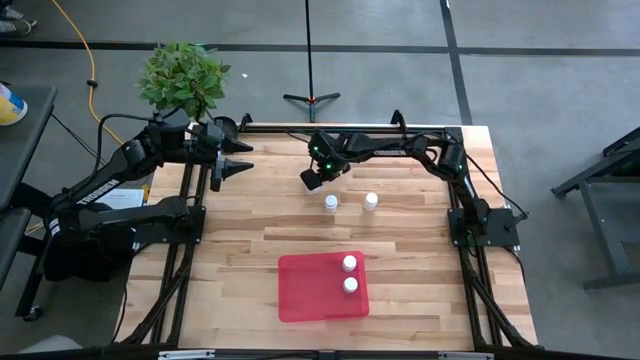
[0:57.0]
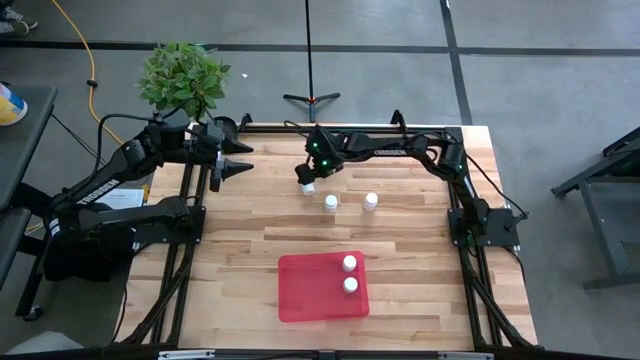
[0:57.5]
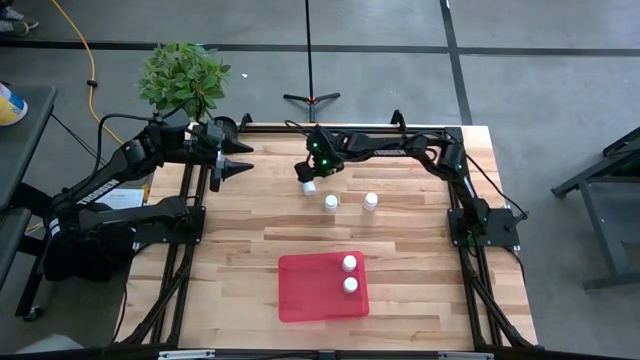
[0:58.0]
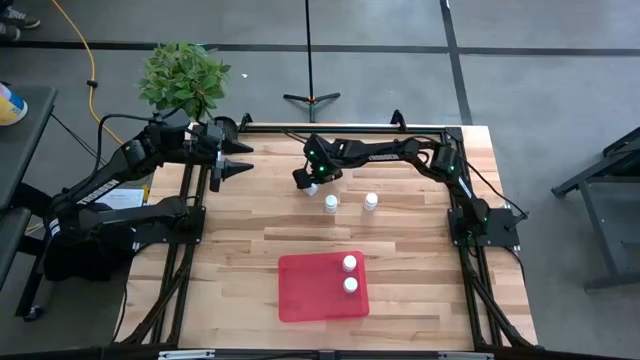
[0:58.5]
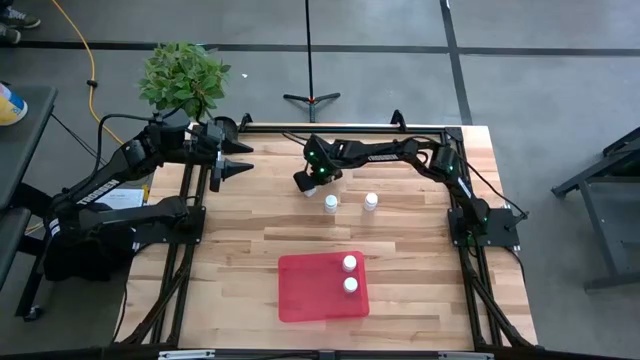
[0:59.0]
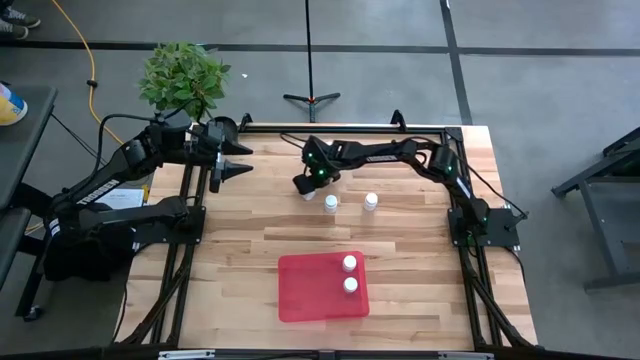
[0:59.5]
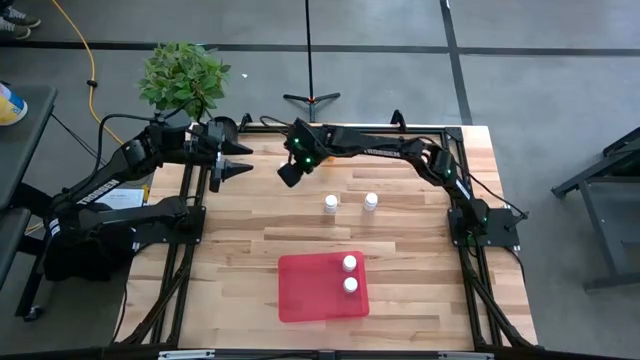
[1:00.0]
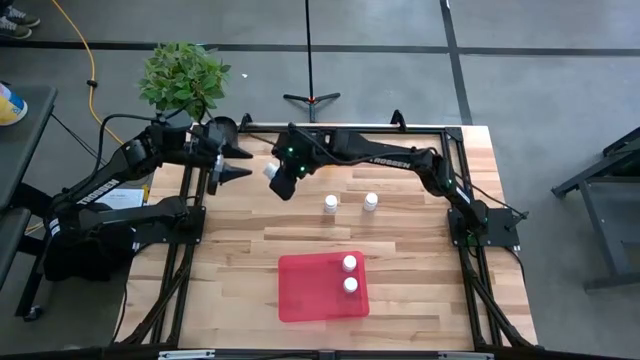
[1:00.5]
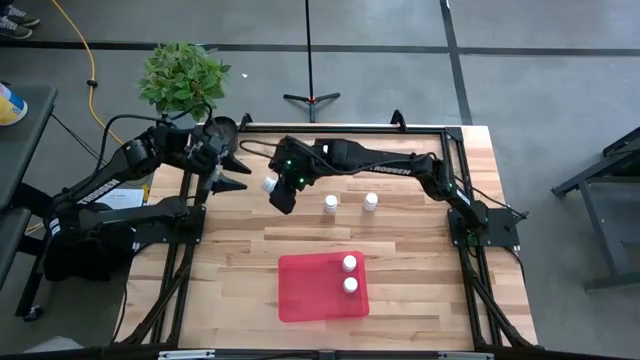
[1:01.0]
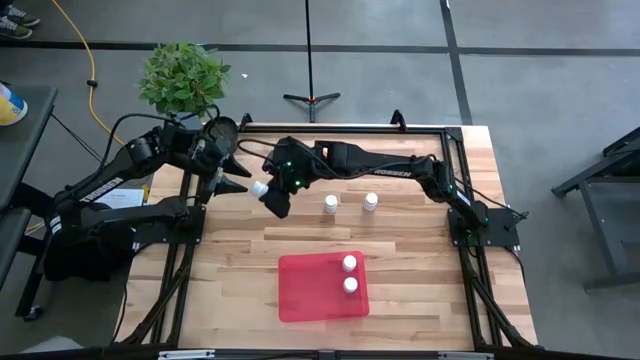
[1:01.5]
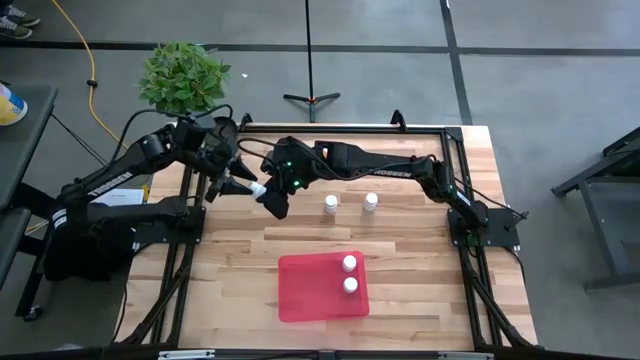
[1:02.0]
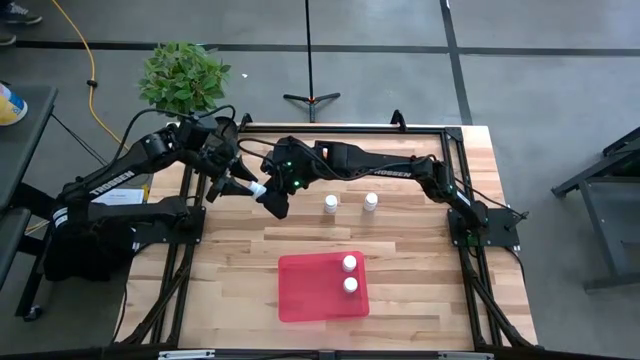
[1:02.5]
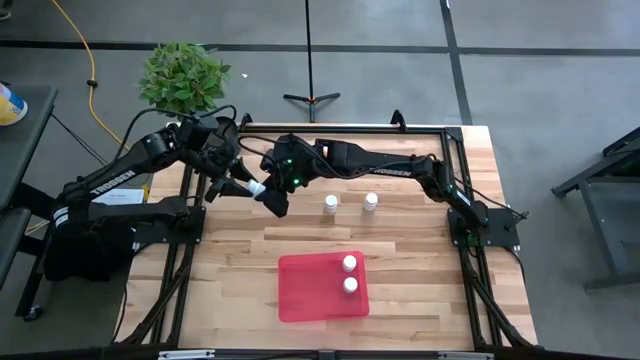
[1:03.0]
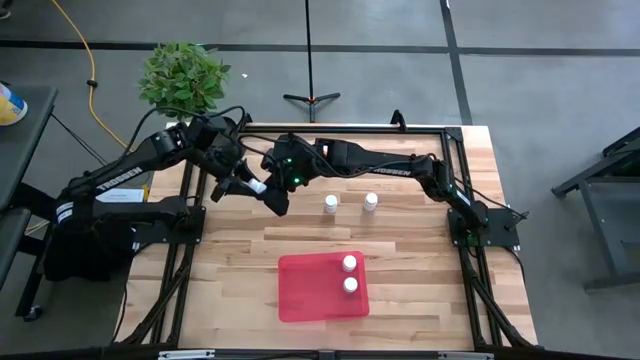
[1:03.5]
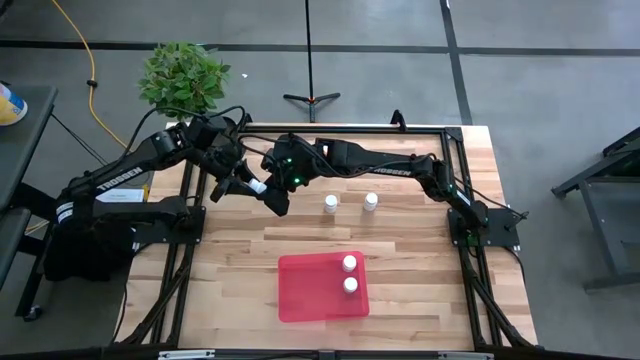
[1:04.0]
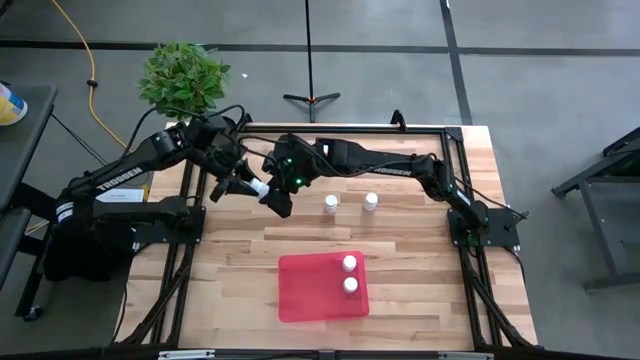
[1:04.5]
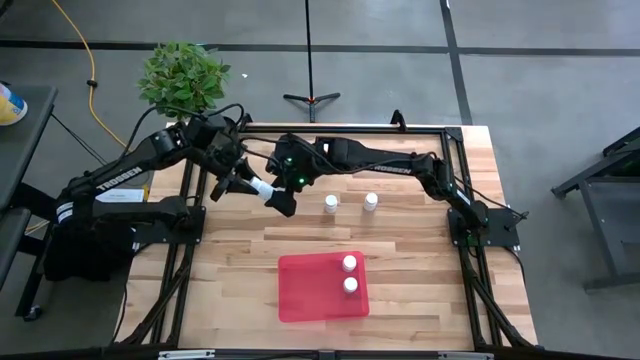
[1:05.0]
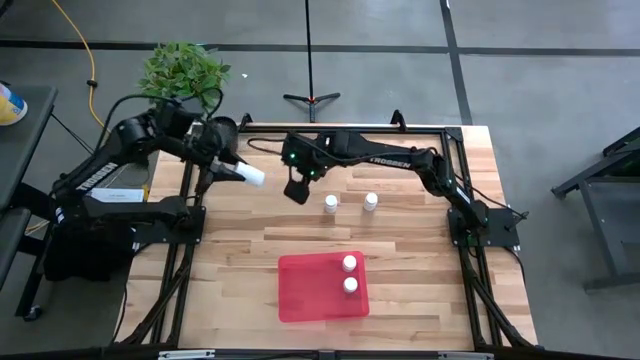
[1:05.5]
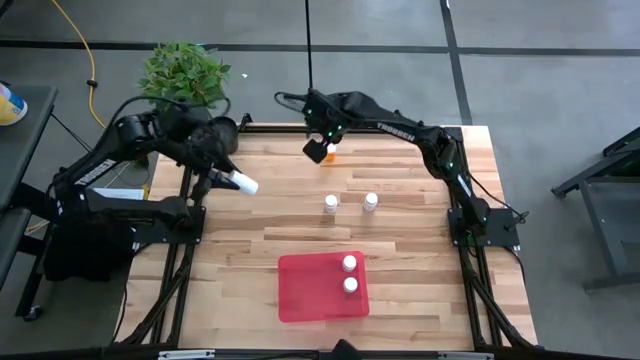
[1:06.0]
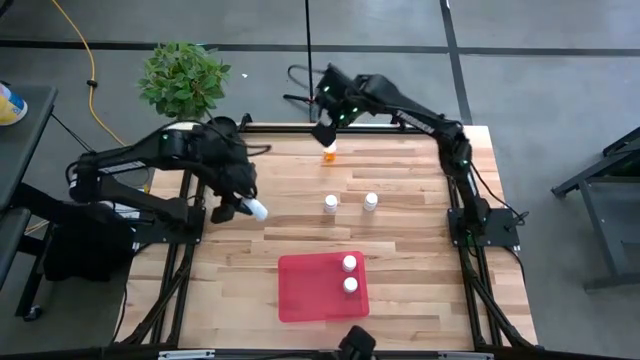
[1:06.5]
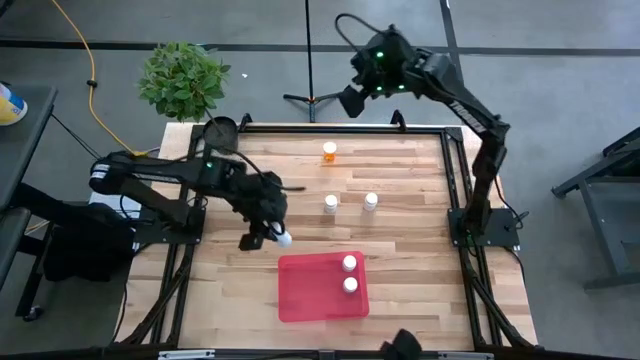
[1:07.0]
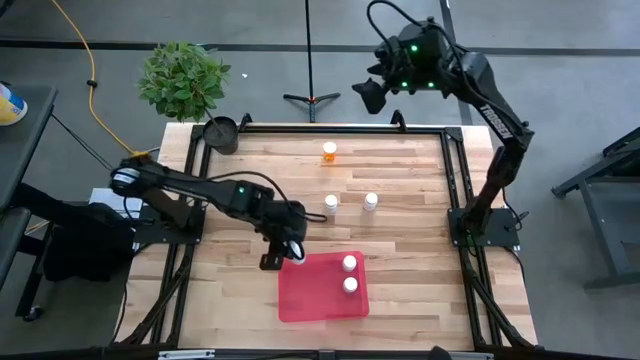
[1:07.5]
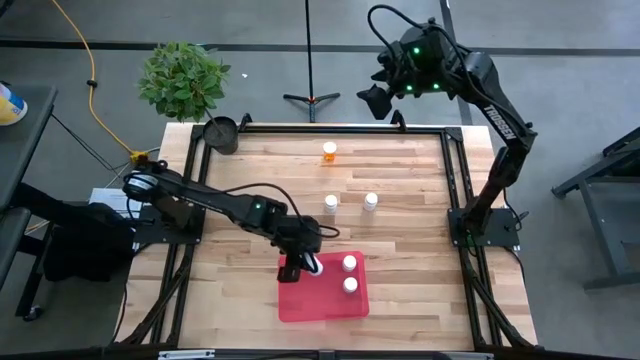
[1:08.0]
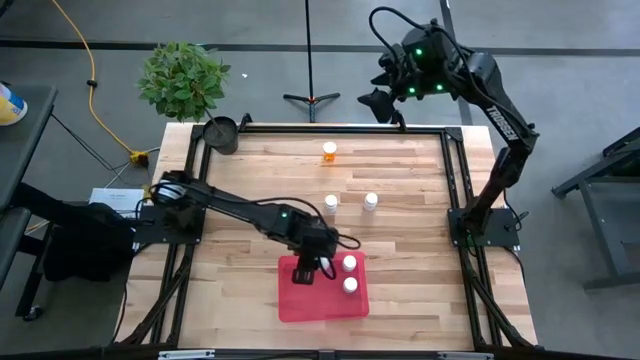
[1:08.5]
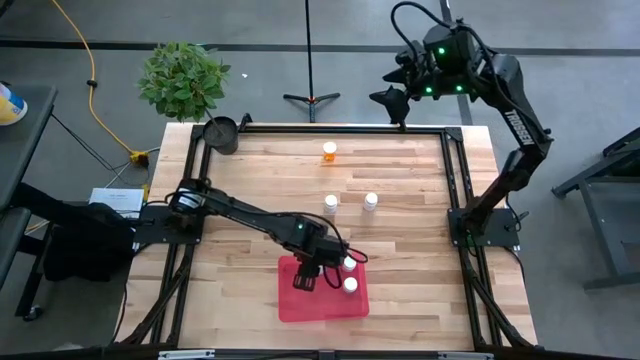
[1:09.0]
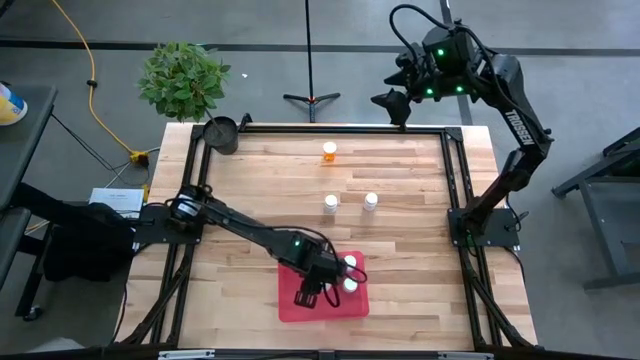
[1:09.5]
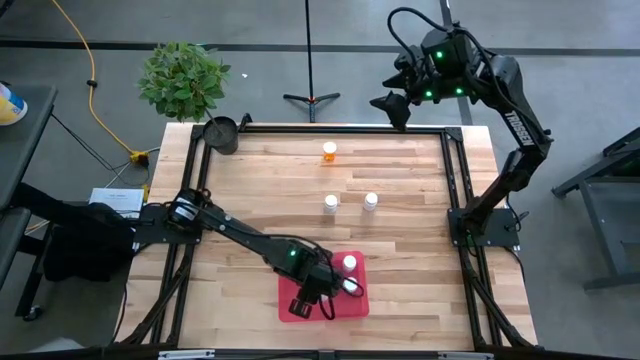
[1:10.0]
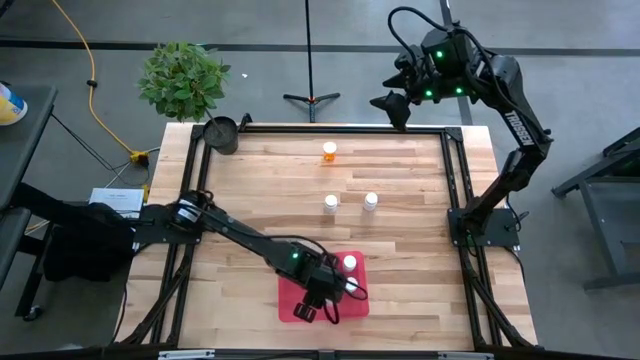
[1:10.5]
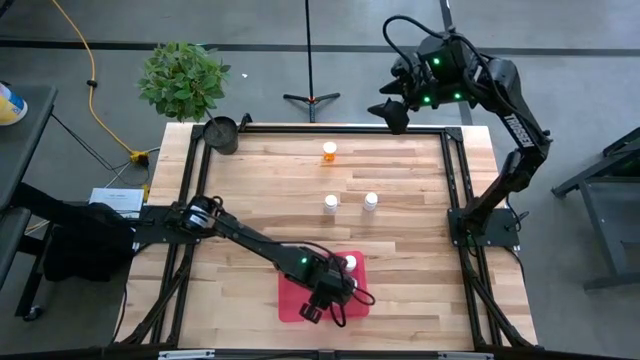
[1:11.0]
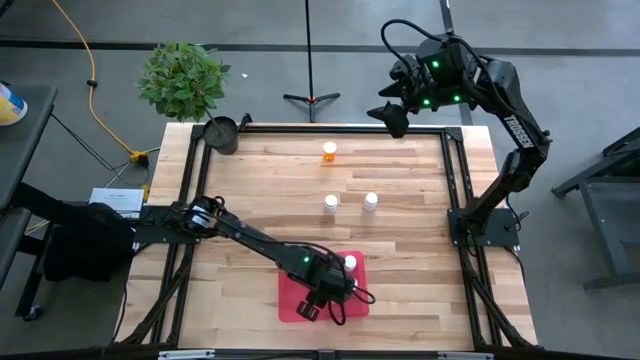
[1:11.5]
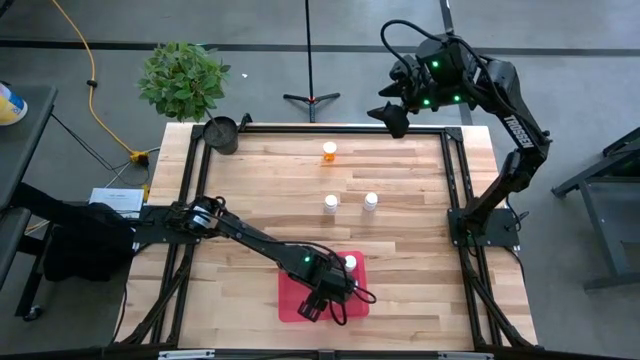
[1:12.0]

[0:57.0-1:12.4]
Task: Pick and place pill bottles into a basket
Put the white medicine bottle into the red container

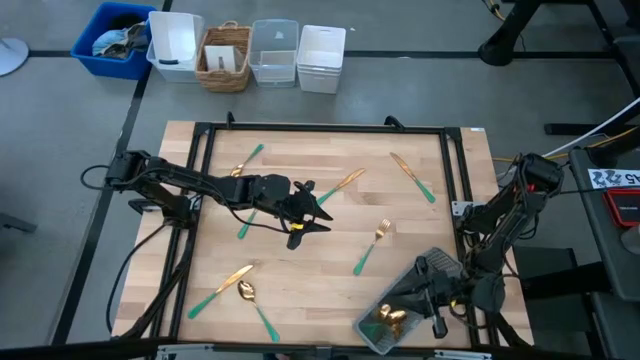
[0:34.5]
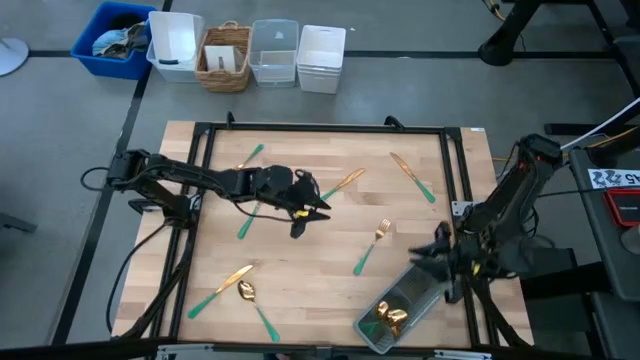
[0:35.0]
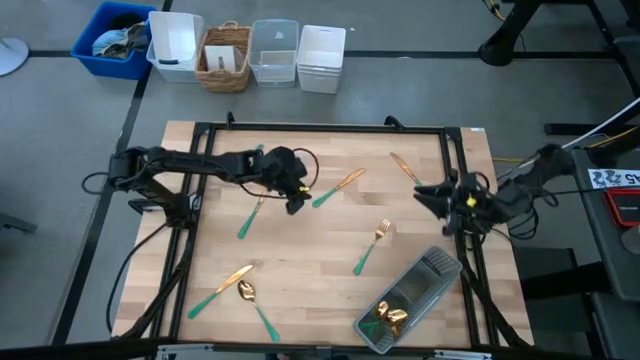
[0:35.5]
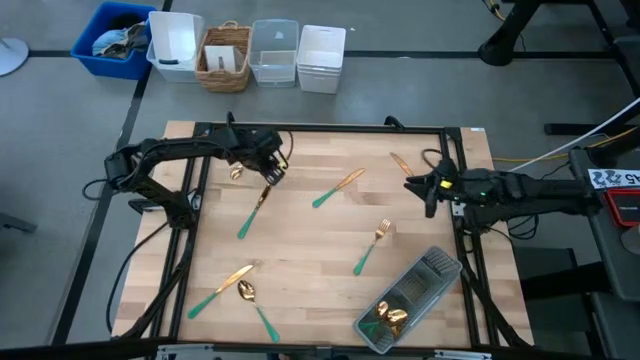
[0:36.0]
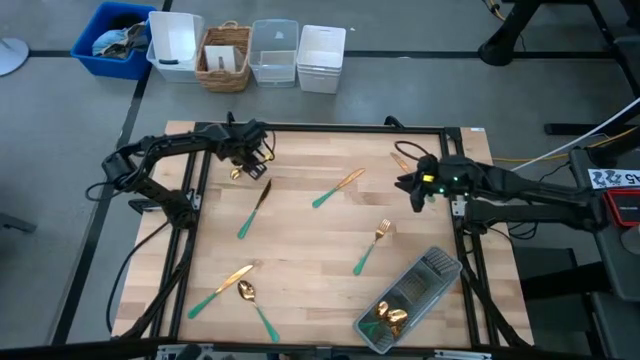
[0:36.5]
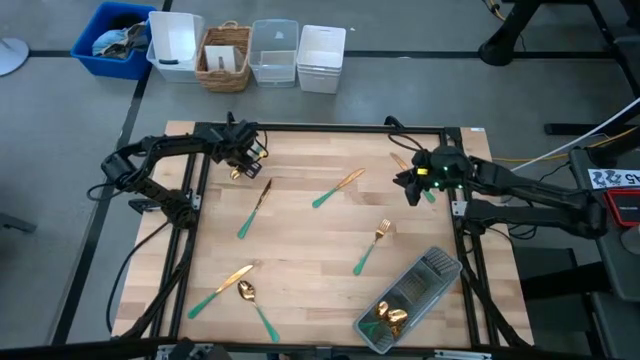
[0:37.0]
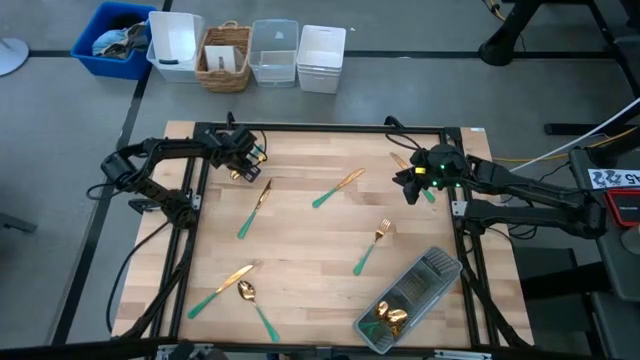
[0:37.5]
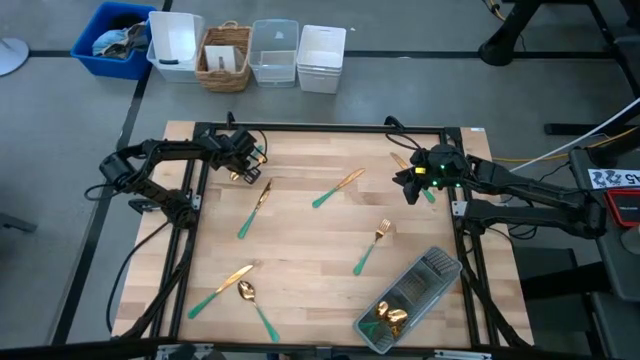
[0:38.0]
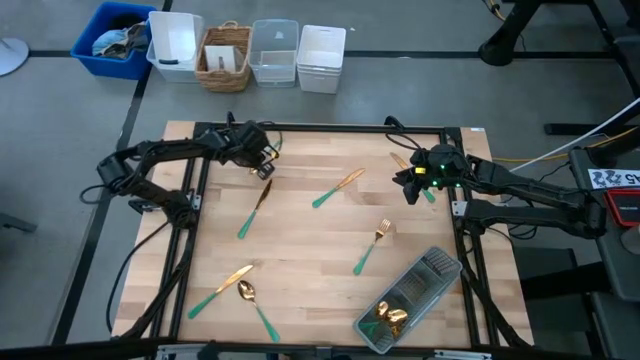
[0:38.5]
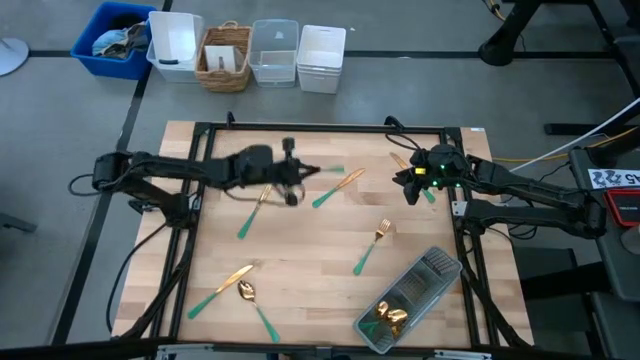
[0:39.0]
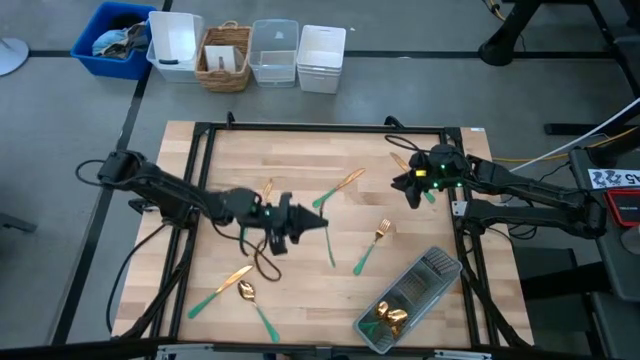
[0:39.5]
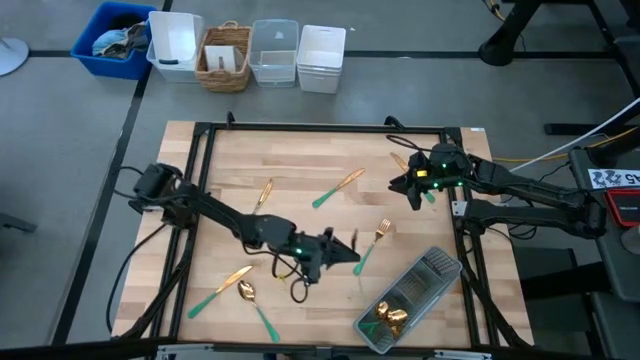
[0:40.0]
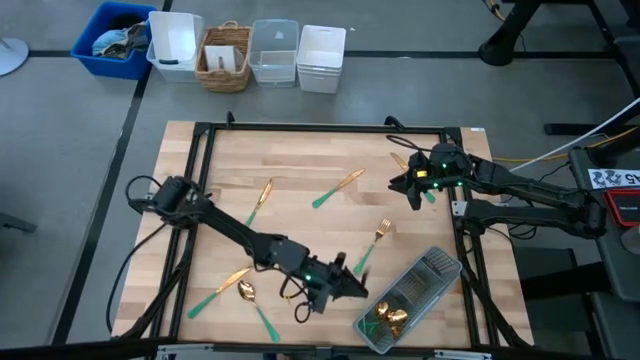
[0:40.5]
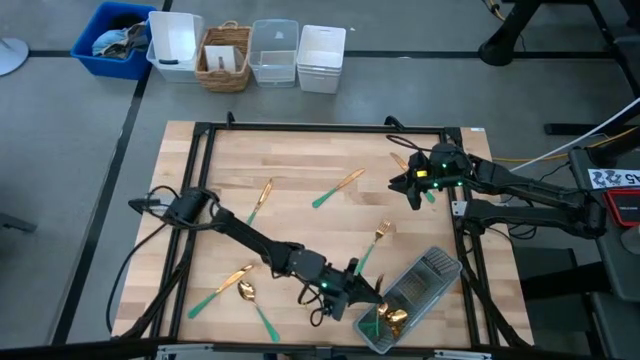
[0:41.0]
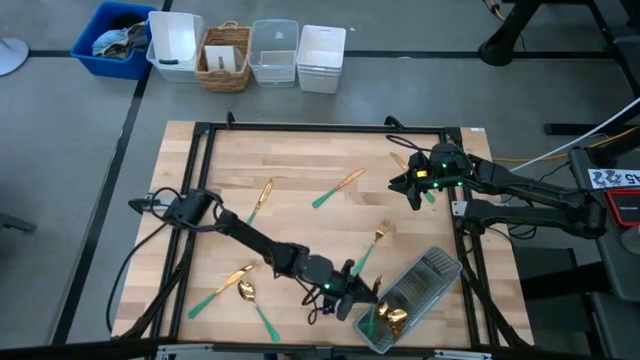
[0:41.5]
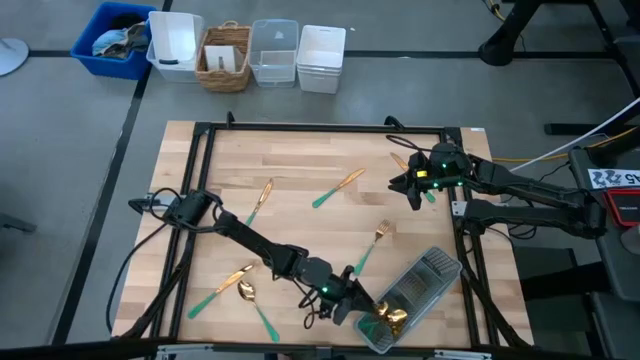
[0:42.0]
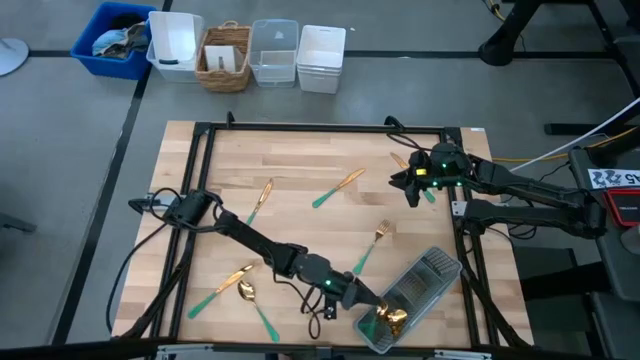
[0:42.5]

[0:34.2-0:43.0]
Task: Sort silverware
Put the top spoon into the utensil organizer
